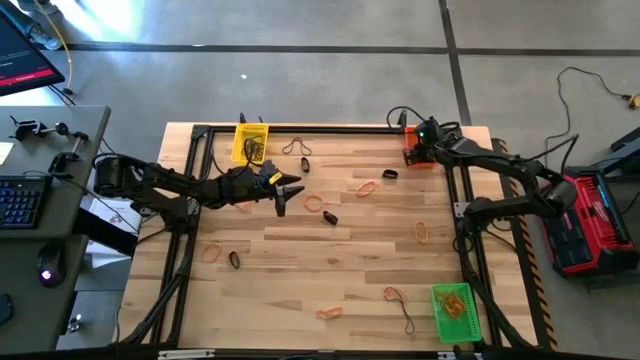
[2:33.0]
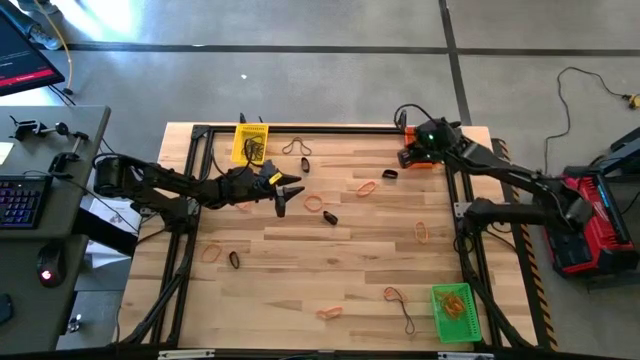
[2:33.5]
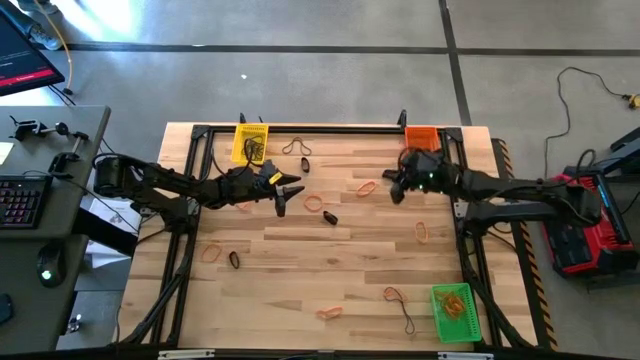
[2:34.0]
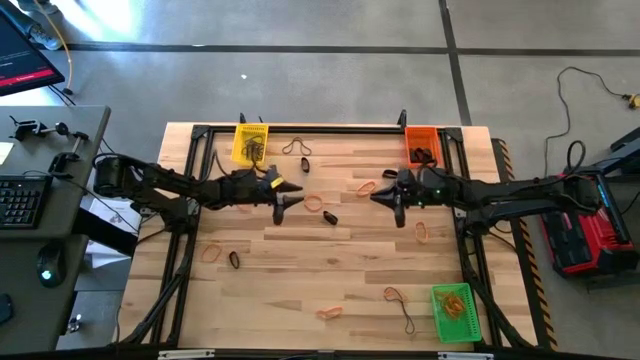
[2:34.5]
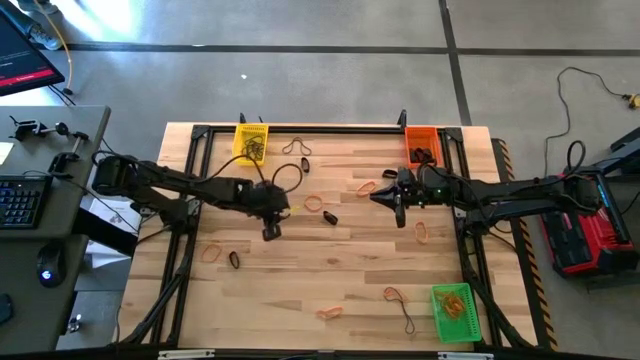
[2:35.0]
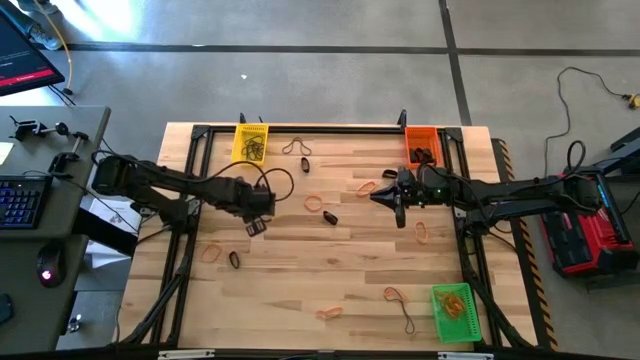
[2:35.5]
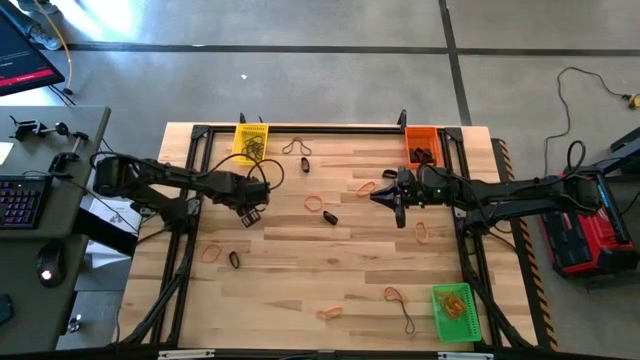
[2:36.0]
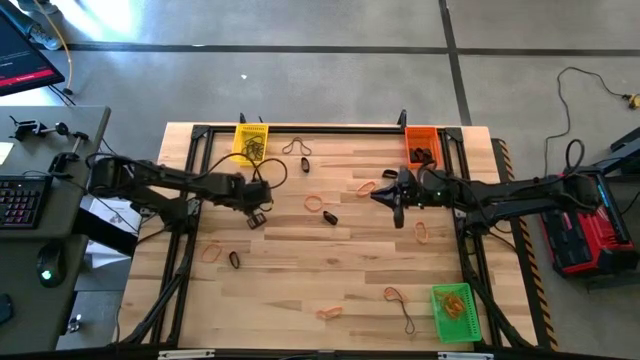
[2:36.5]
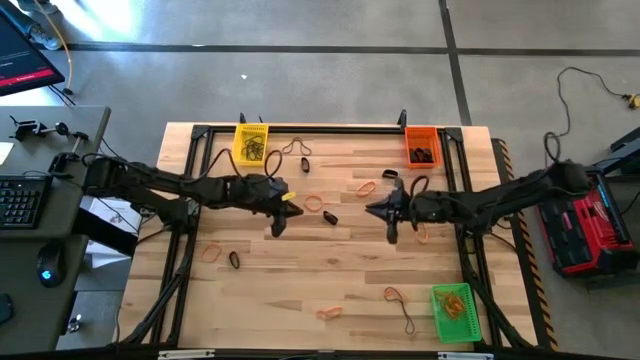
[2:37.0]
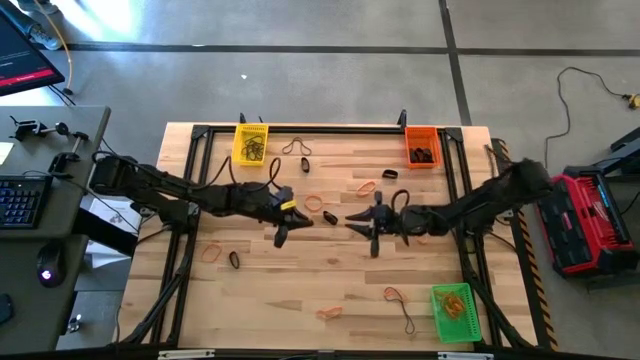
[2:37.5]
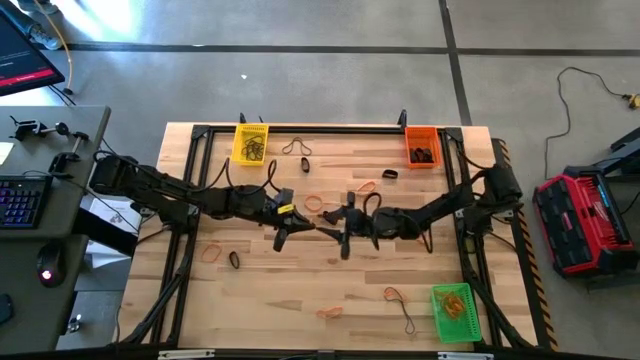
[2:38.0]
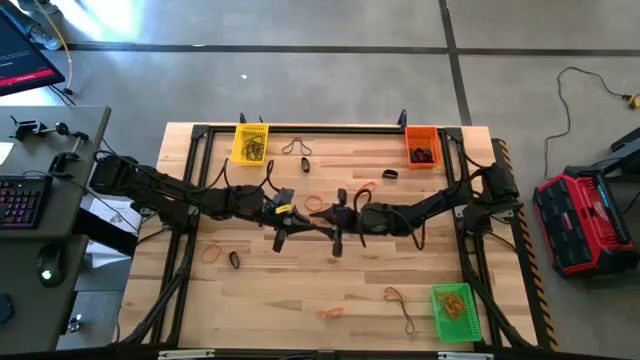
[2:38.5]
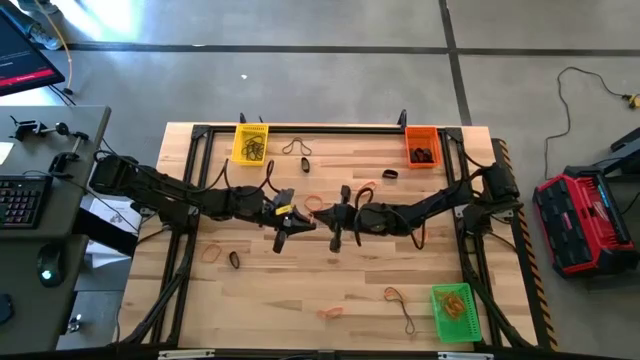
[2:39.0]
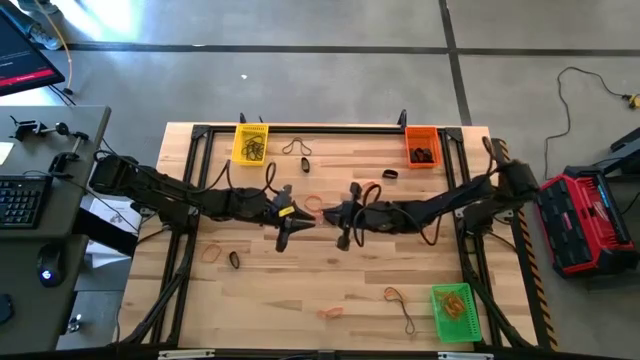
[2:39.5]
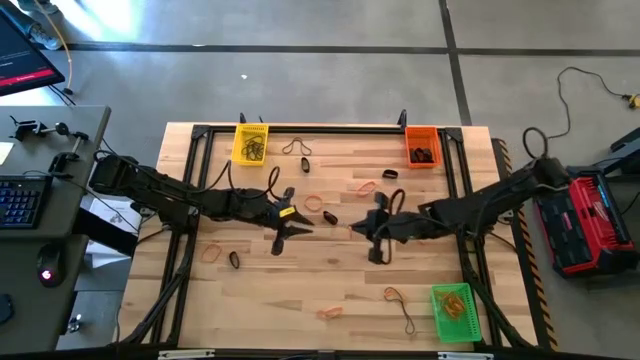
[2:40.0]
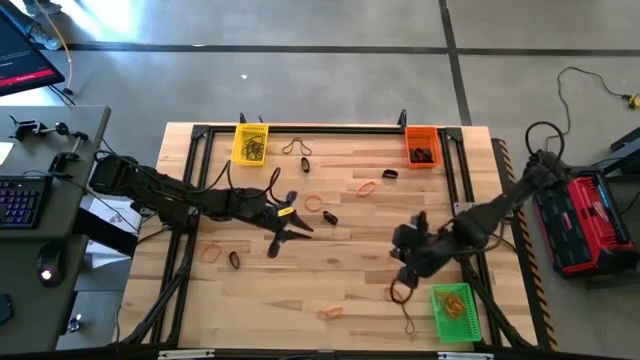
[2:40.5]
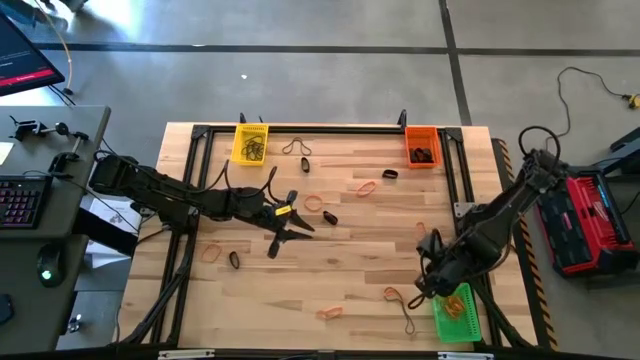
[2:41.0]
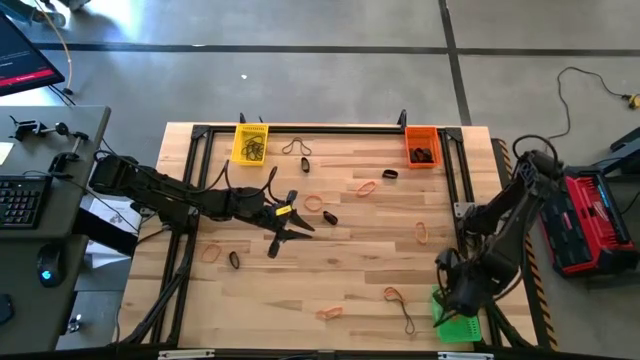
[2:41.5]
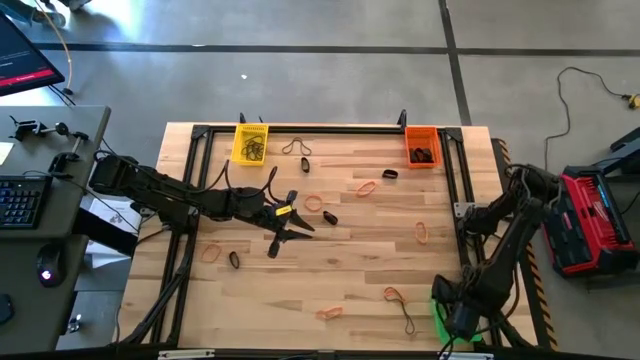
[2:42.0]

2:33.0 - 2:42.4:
Task: Sort rubber bands into baskets
Put the orange rubber band into the green bin

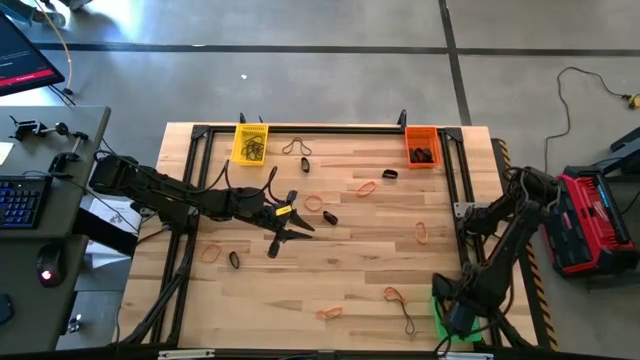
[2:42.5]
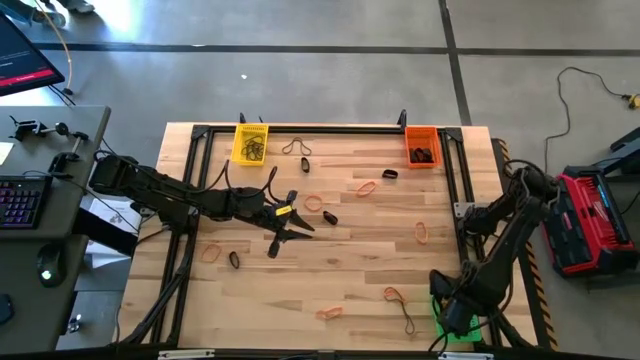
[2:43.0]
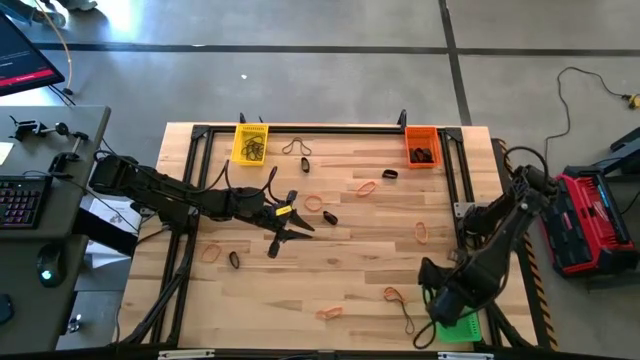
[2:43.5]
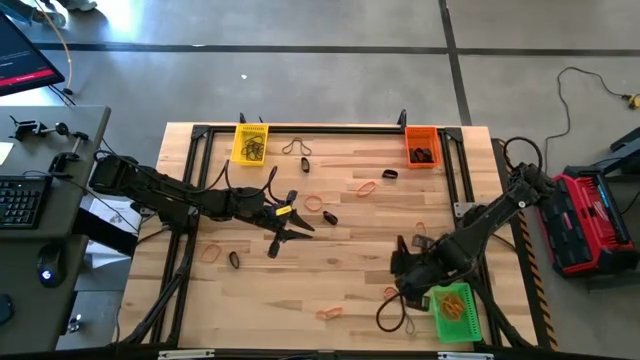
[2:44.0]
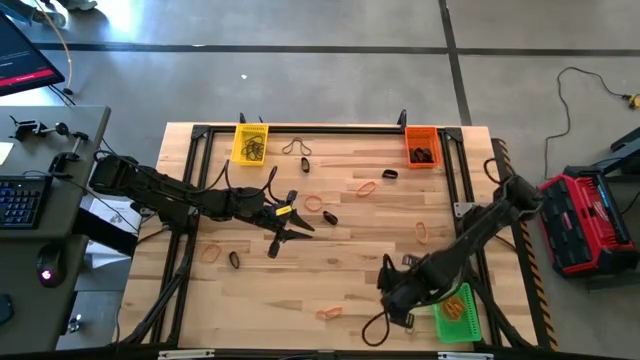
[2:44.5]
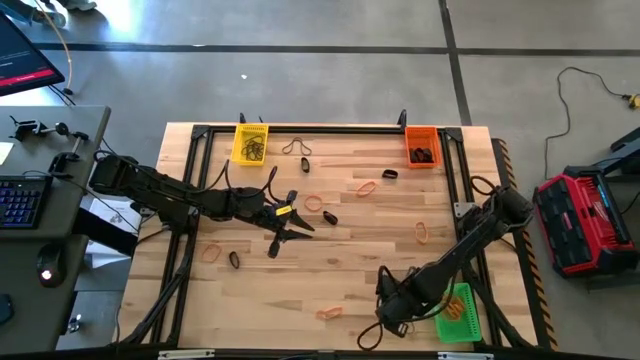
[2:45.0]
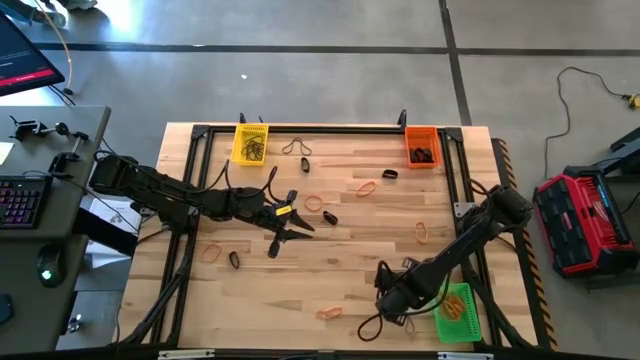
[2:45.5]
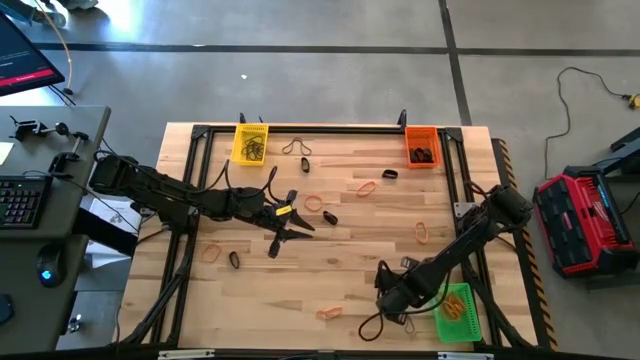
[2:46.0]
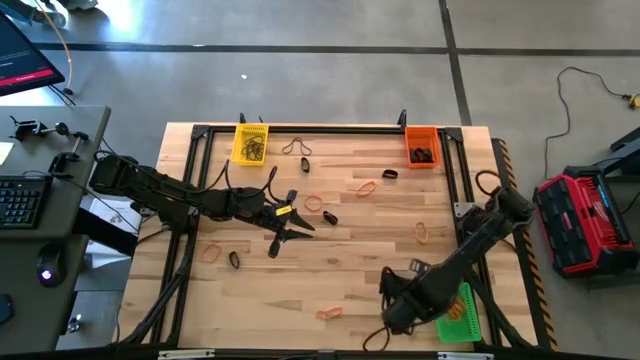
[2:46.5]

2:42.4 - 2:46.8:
Put the orange rubber band into the green bin

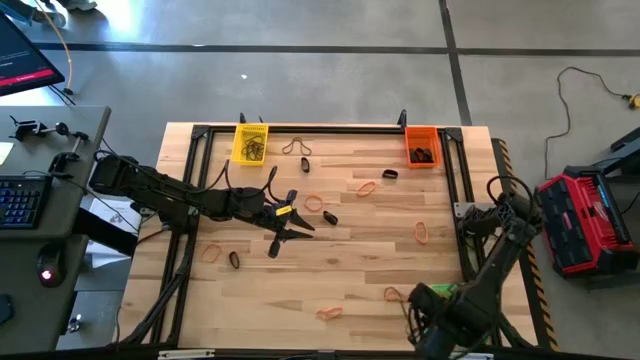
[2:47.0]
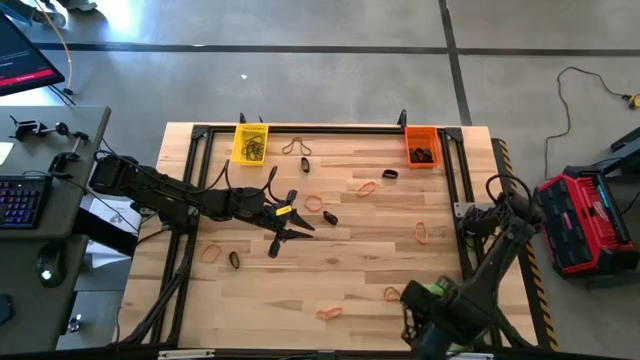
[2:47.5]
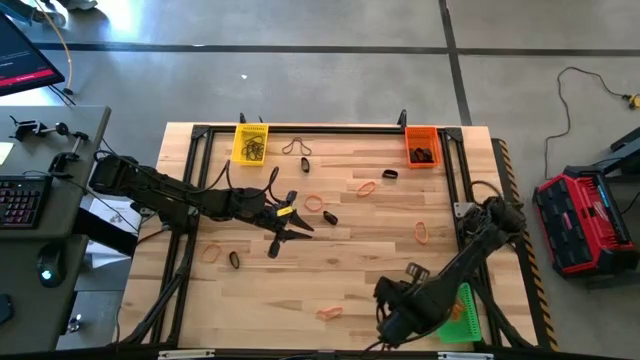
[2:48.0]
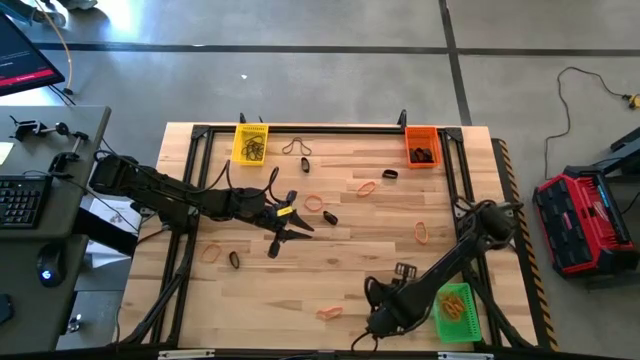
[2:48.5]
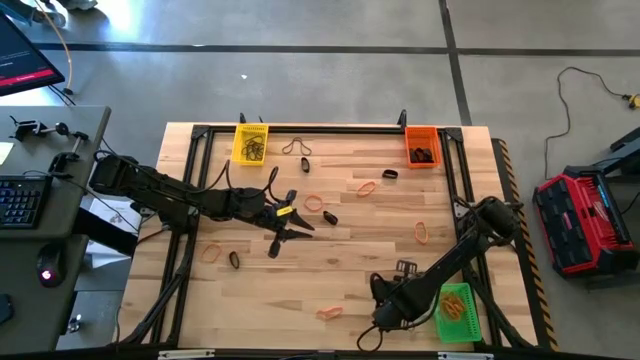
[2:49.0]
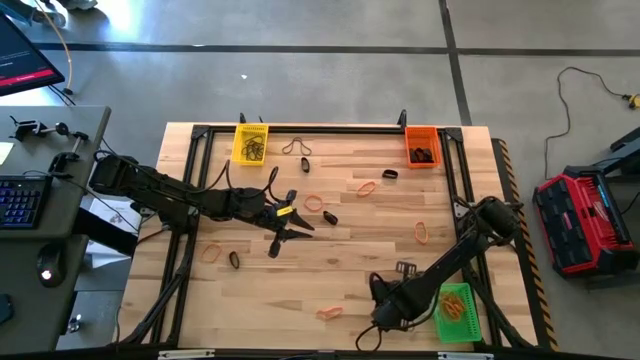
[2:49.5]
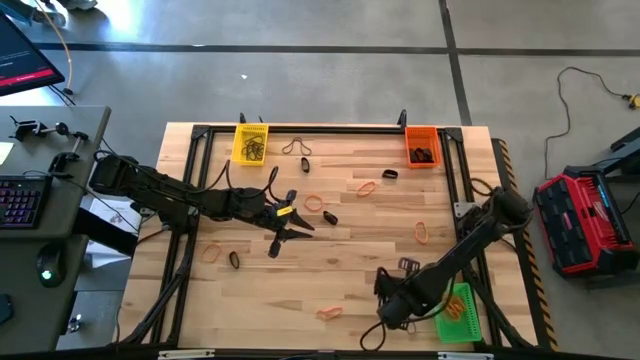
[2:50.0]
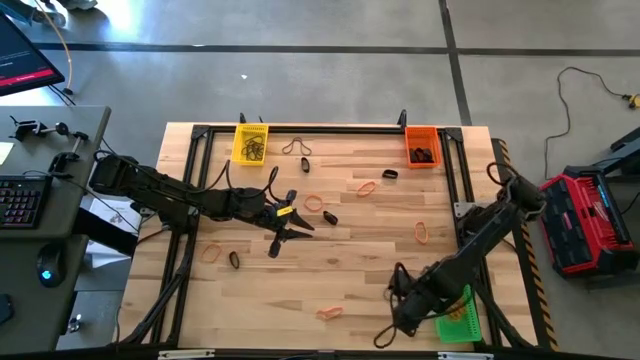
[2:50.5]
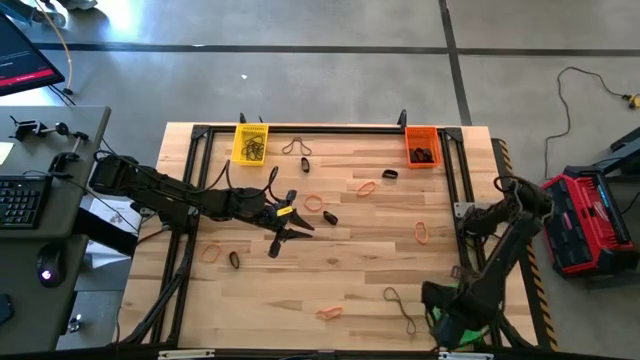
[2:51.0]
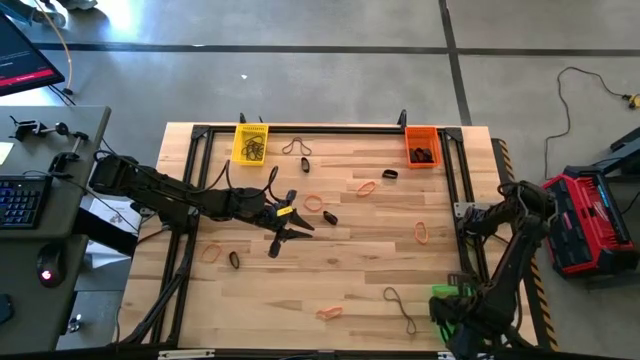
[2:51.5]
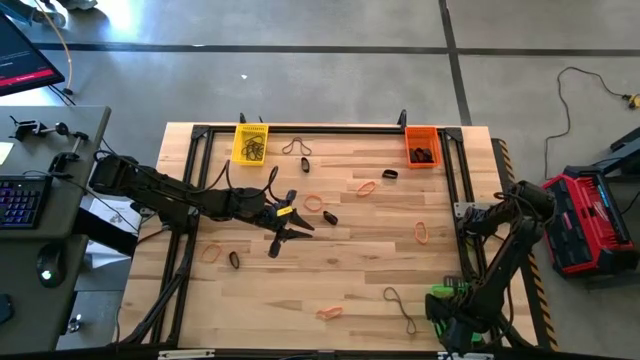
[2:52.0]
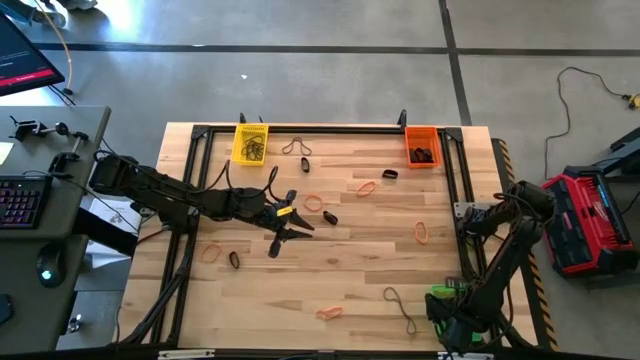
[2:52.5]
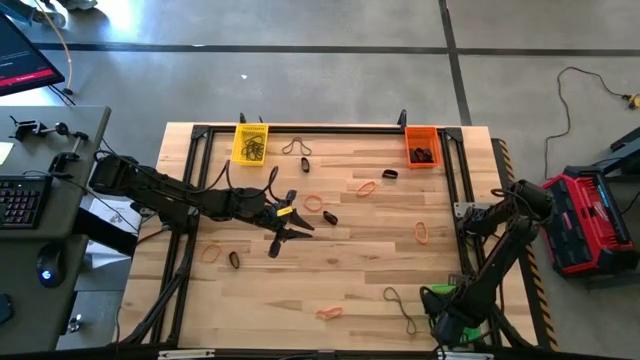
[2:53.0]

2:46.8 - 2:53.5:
Put the orange rubber band into the green bin
